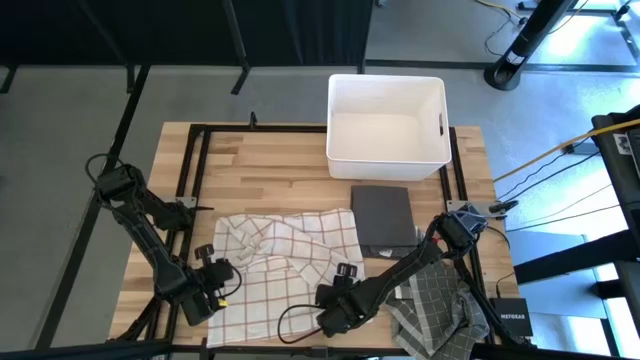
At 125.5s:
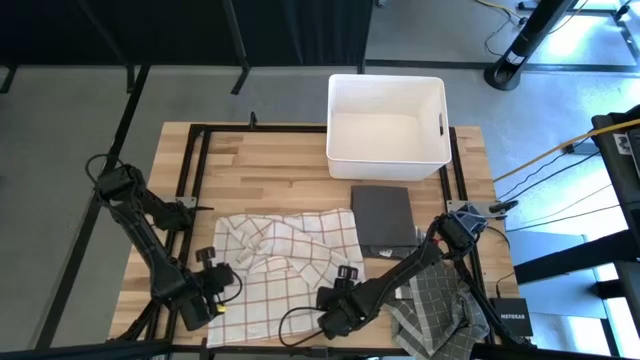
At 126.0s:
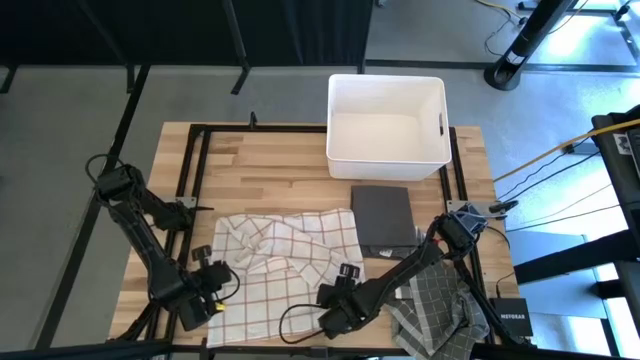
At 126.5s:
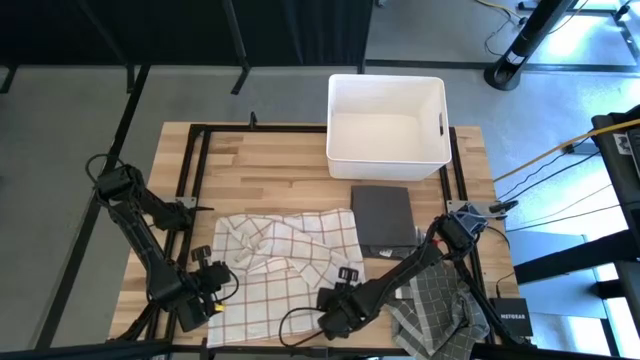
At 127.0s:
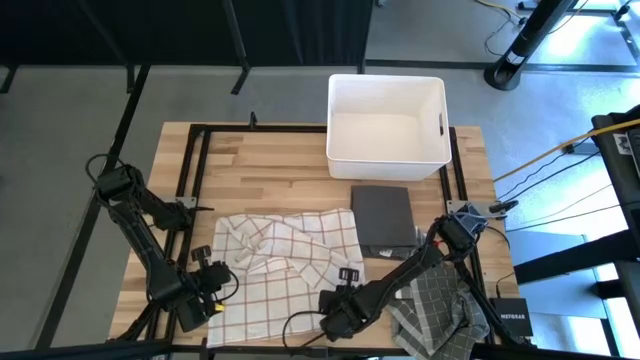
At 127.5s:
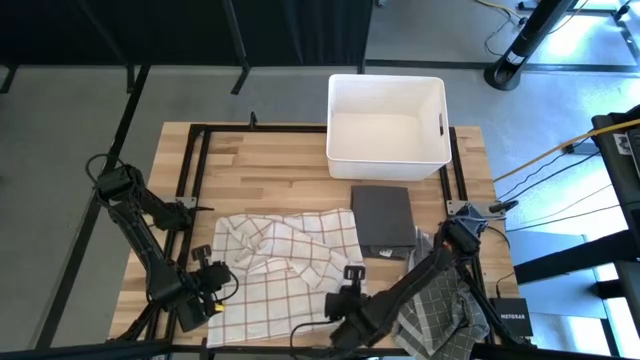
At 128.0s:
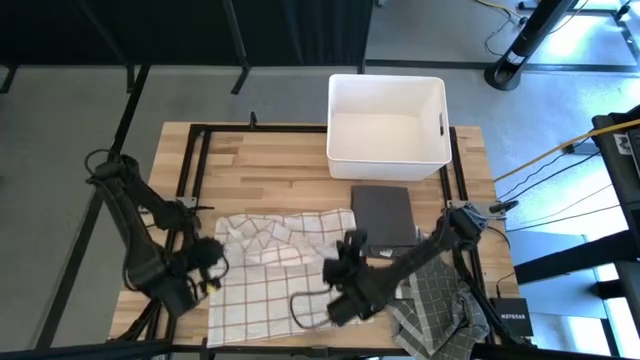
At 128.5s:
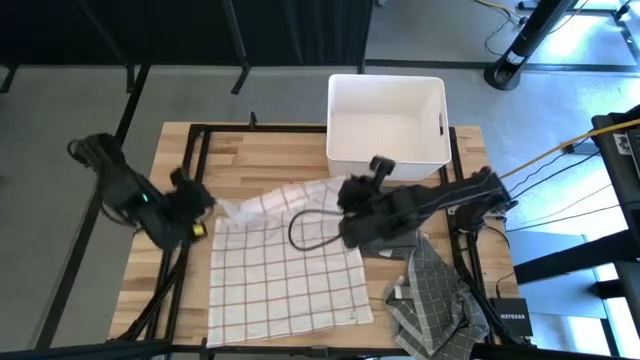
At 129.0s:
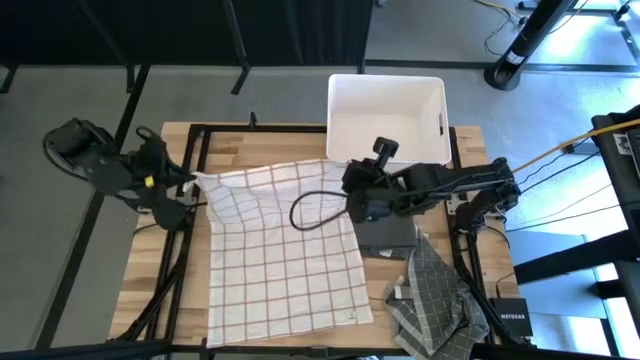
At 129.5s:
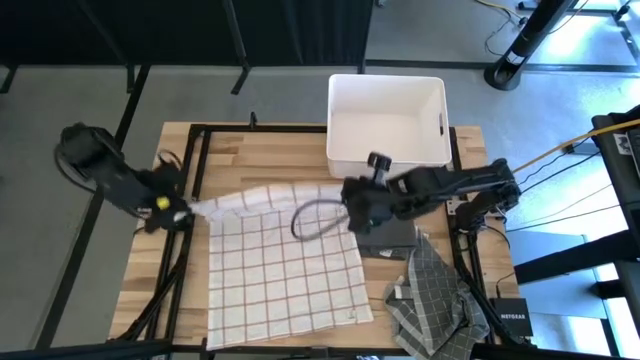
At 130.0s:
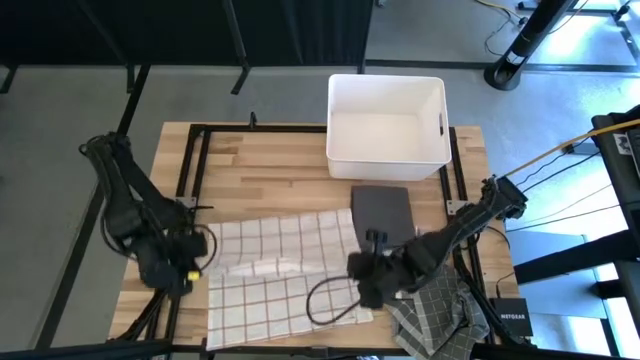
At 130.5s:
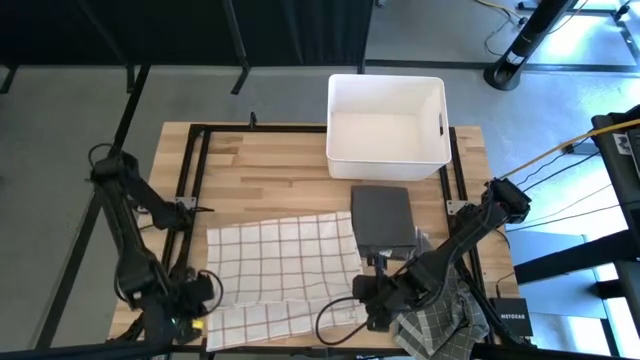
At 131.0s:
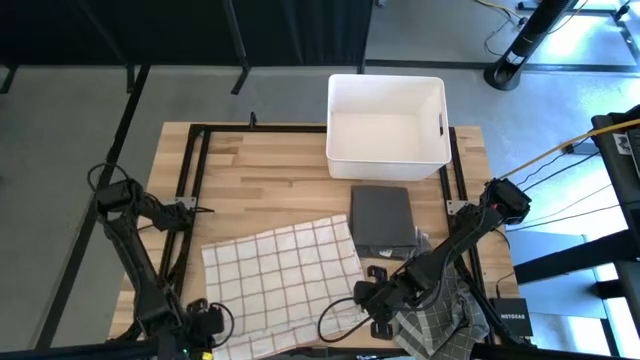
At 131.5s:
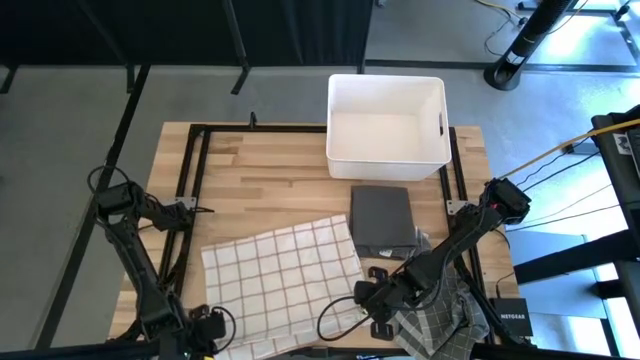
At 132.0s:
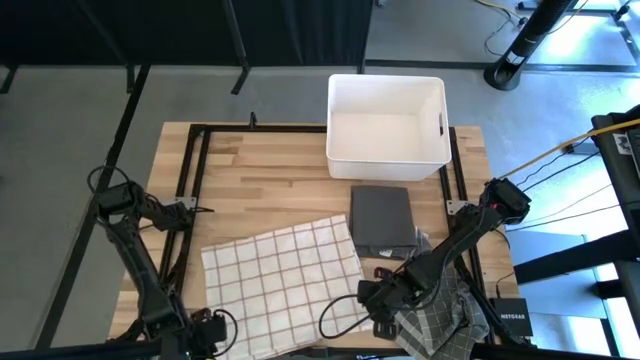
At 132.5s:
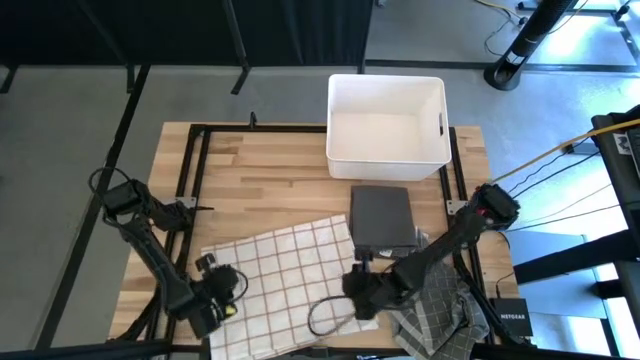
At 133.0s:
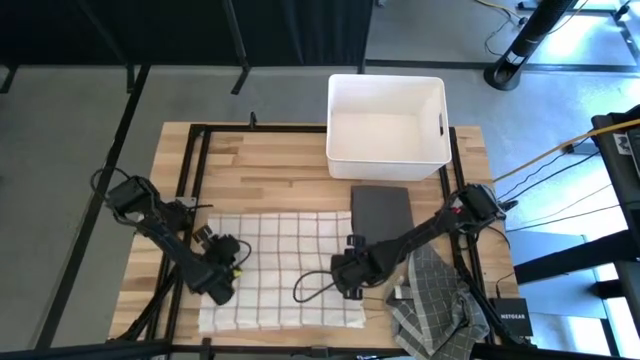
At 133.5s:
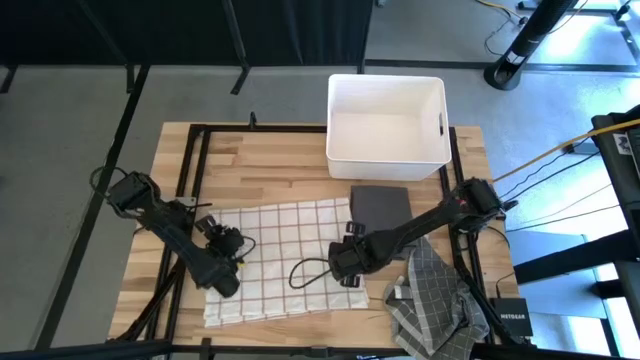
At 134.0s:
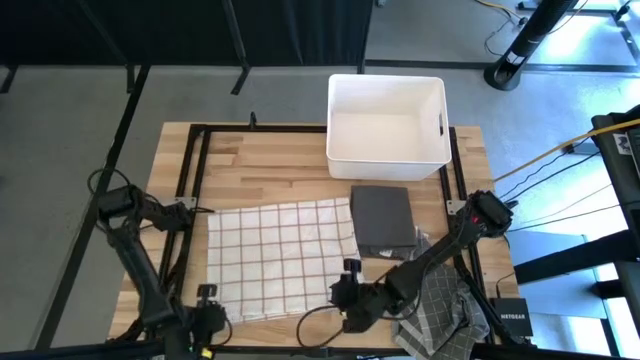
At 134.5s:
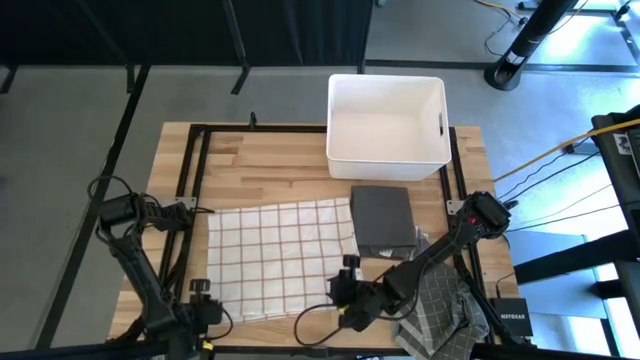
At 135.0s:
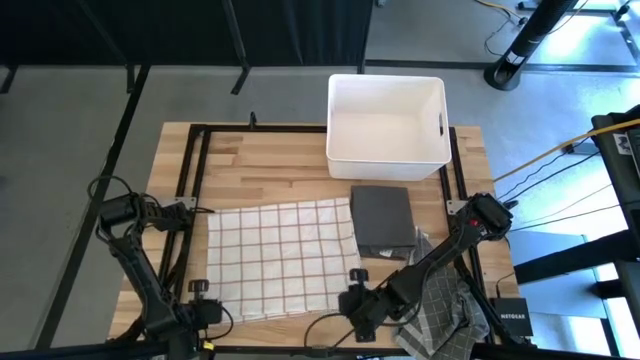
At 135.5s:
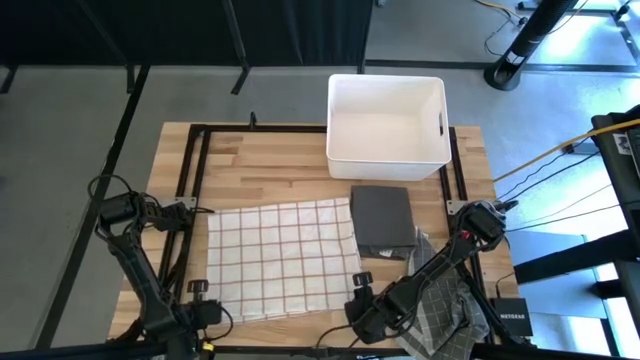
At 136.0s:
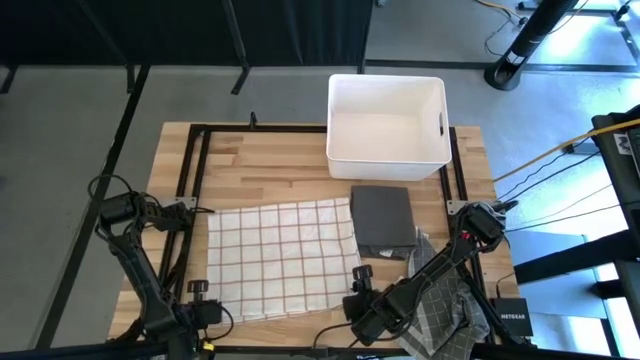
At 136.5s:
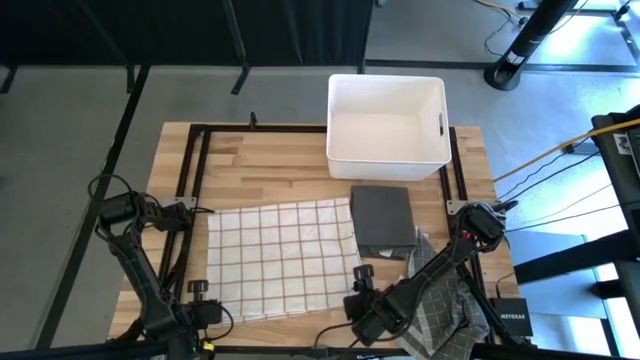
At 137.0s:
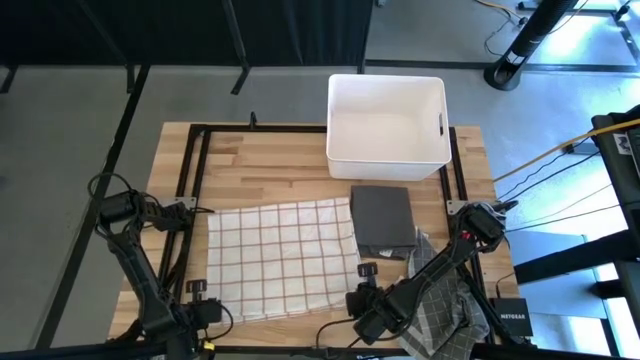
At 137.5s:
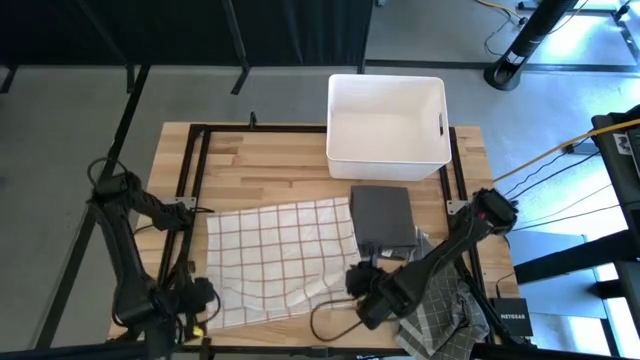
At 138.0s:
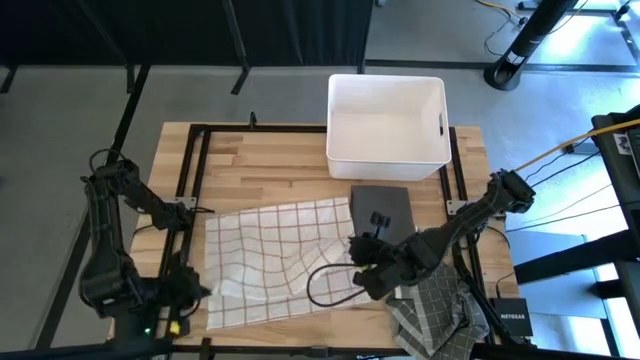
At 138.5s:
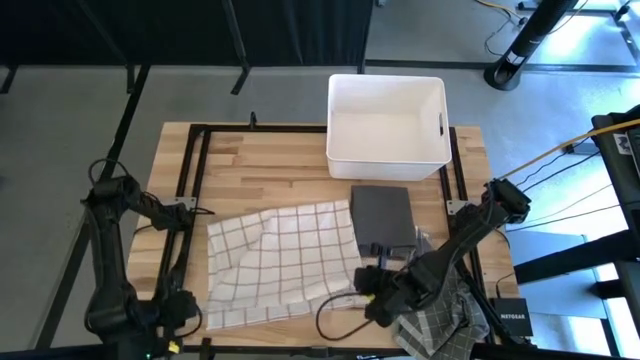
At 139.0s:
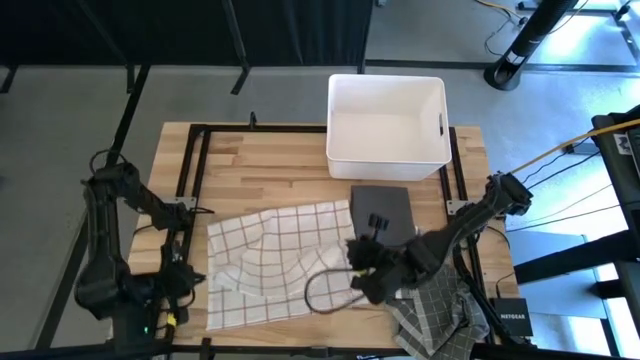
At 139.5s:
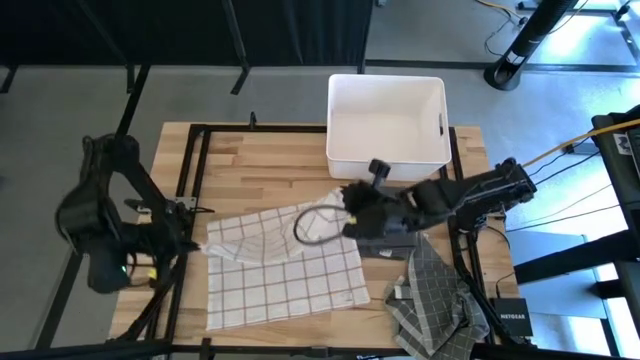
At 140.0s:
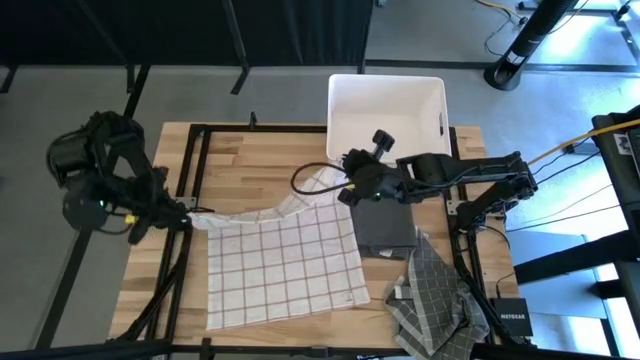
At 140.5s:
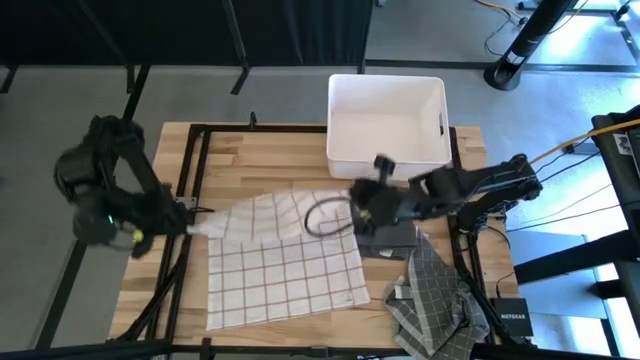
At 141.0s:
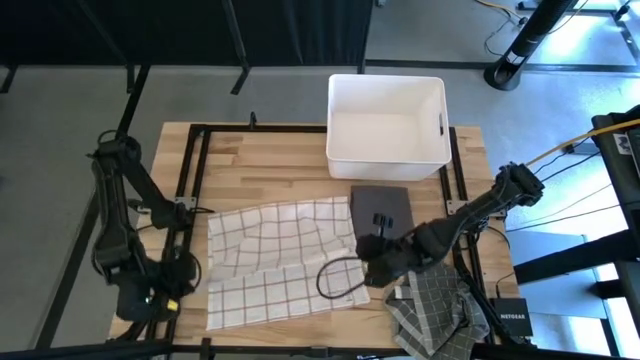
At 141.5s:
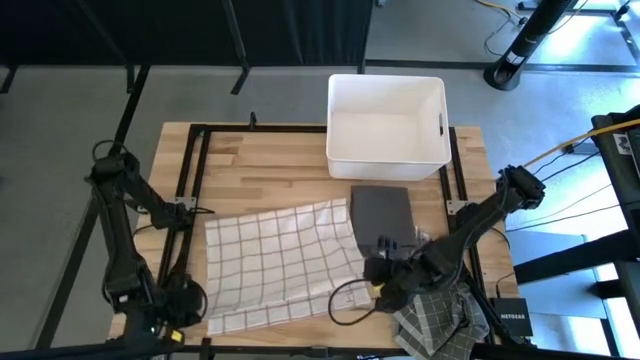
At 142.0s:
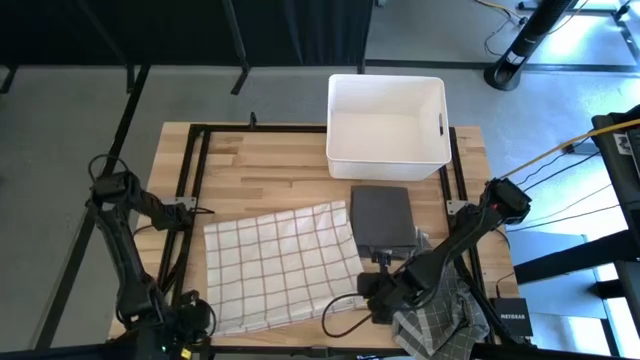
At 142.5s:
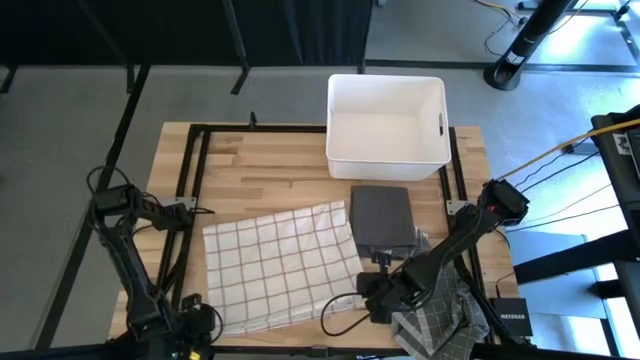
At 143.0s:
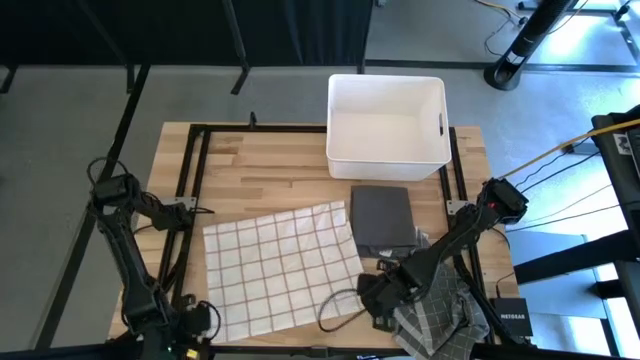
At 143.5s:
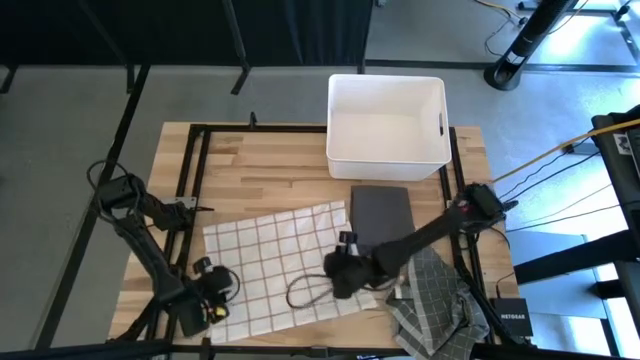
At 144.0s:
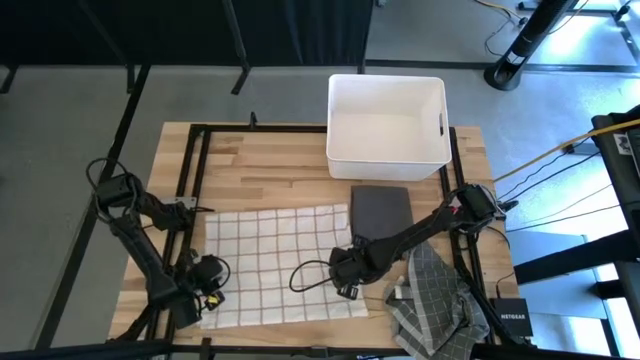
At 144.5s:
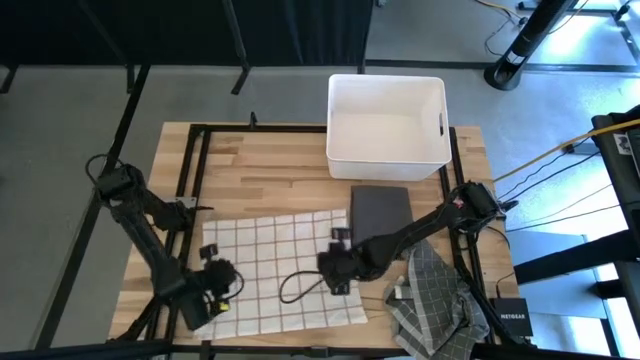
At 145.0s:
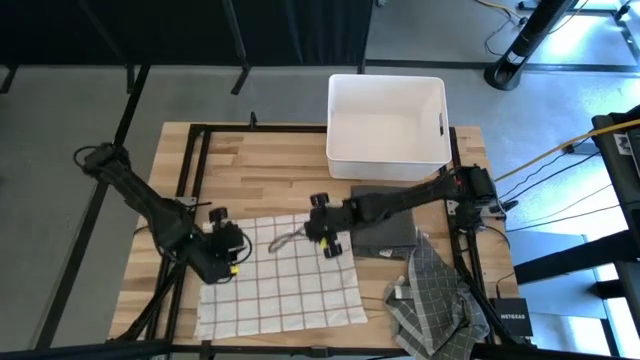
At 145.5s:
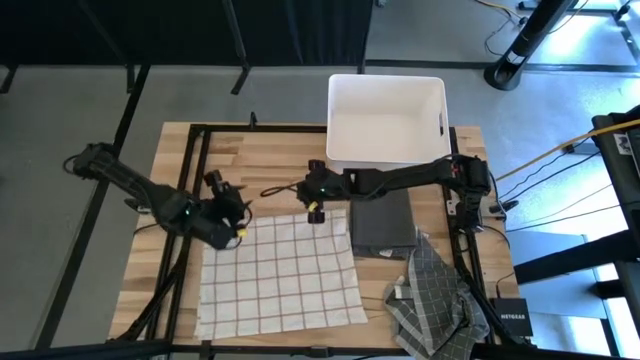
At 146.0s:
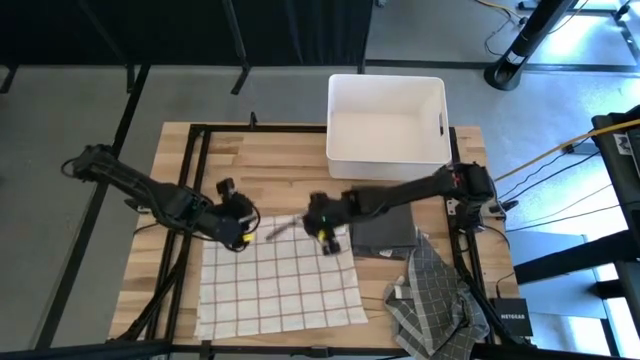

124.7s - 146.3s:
Task: Fold towel
Fold the white towel
